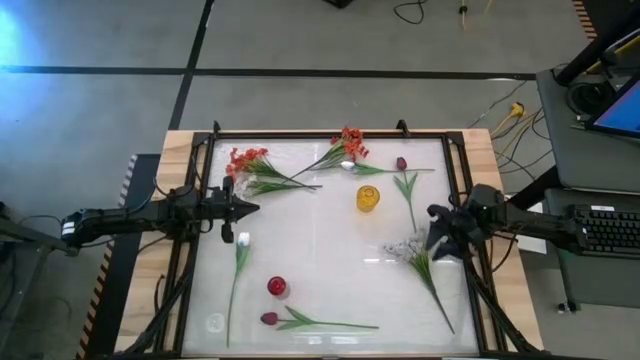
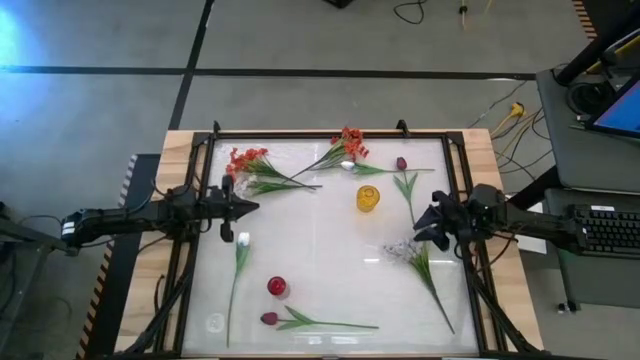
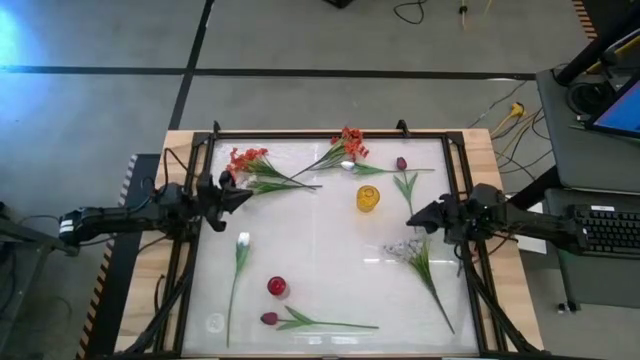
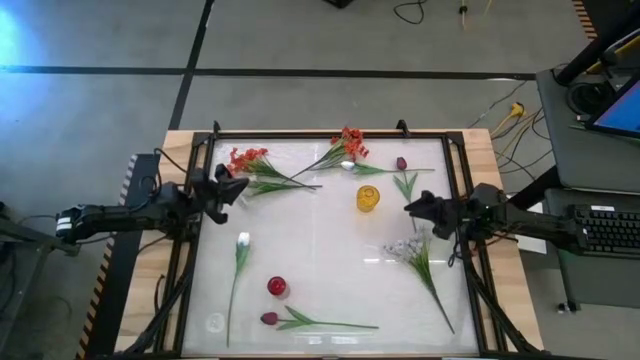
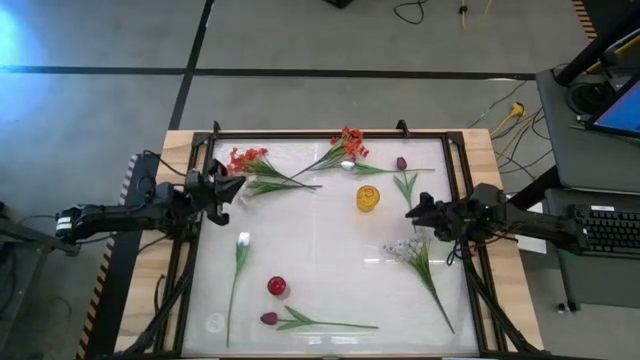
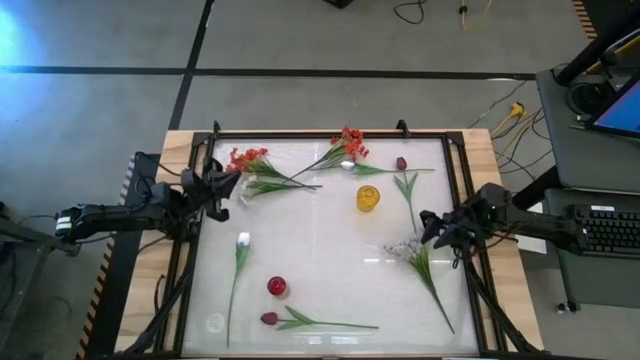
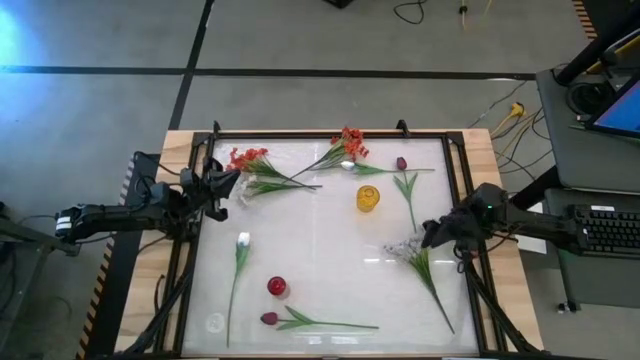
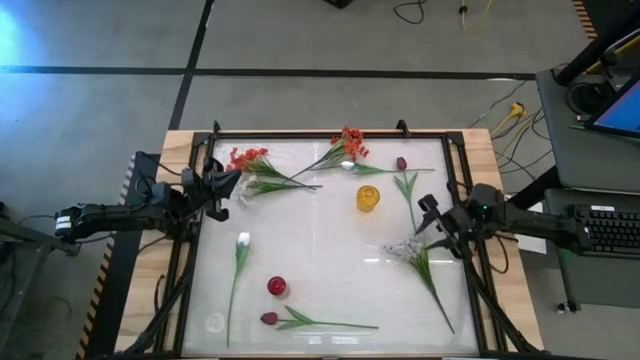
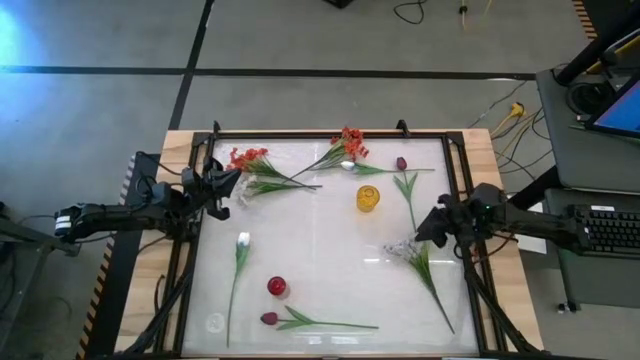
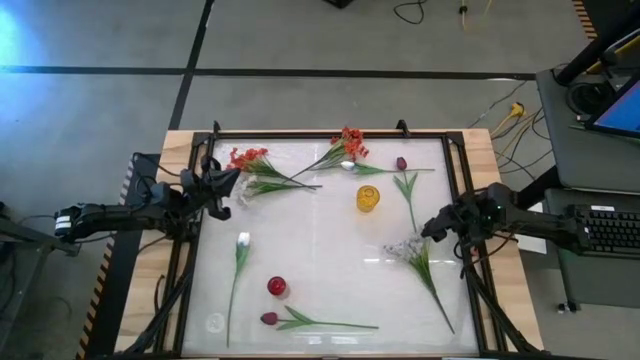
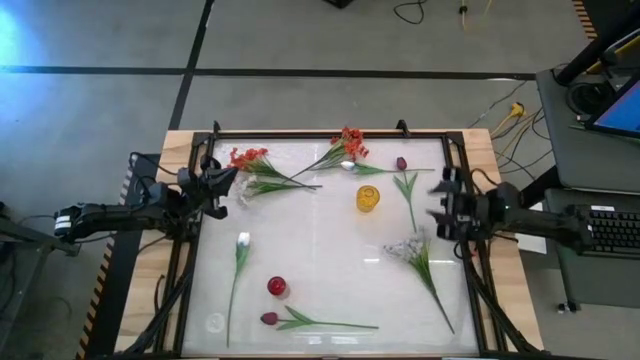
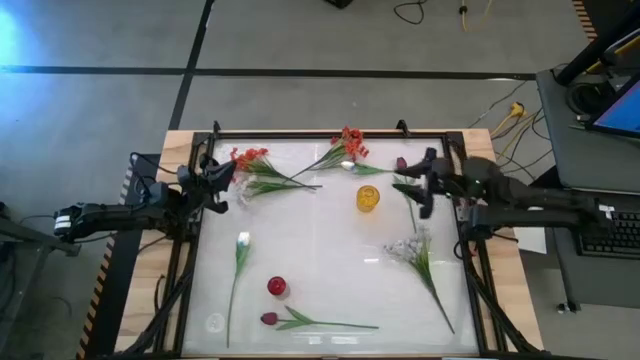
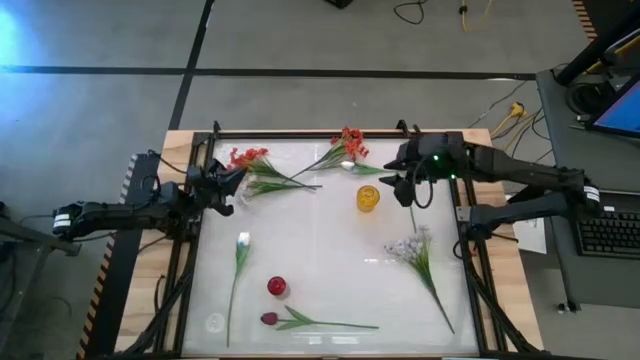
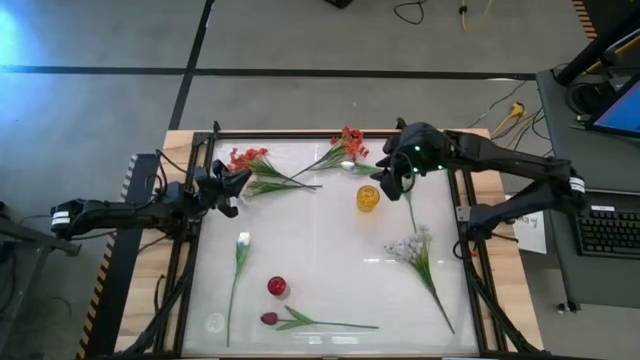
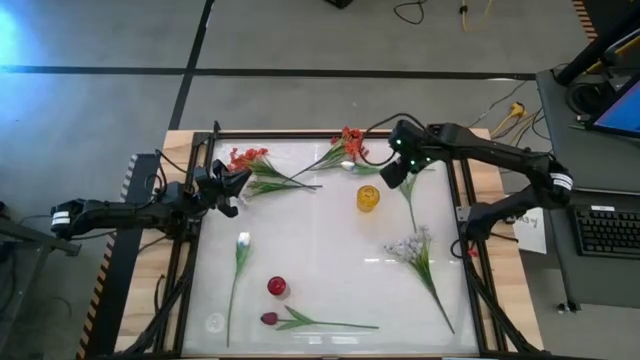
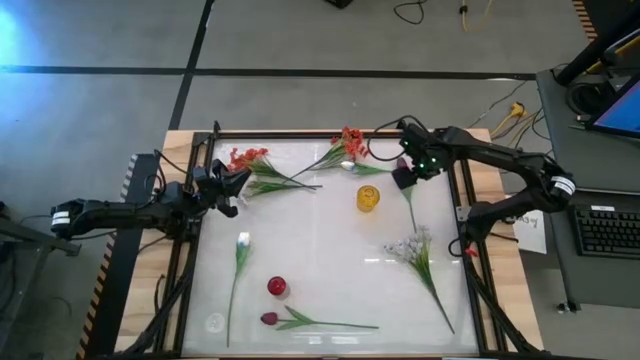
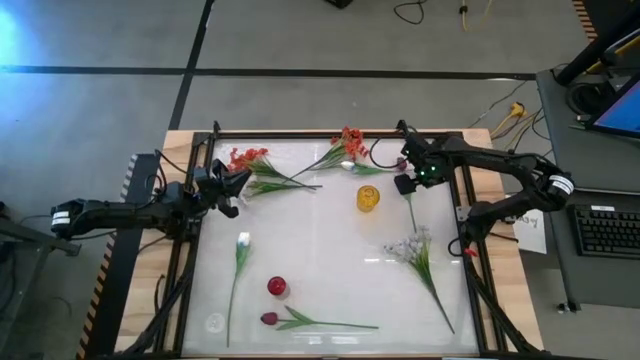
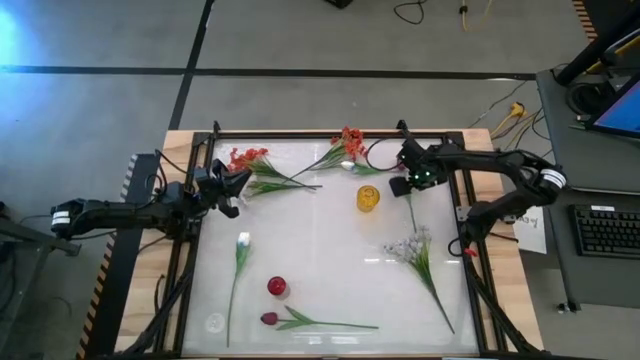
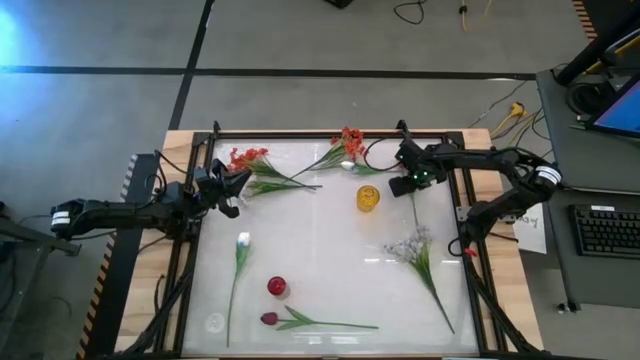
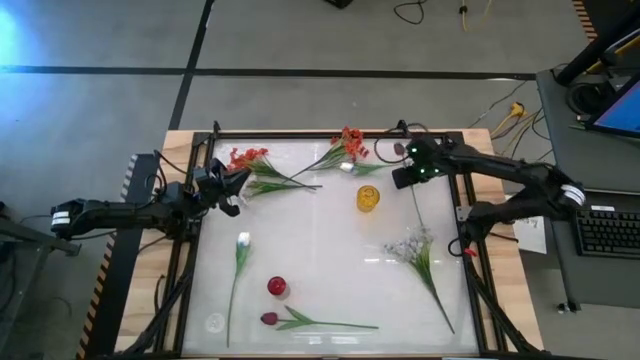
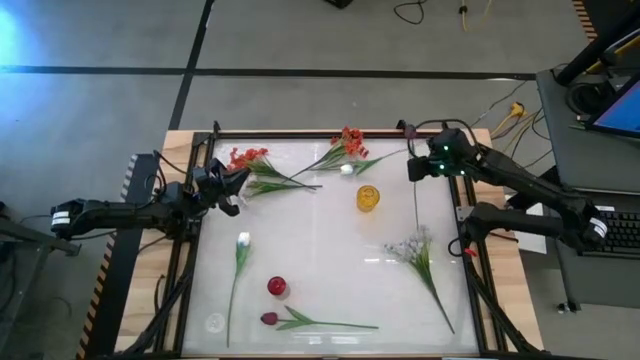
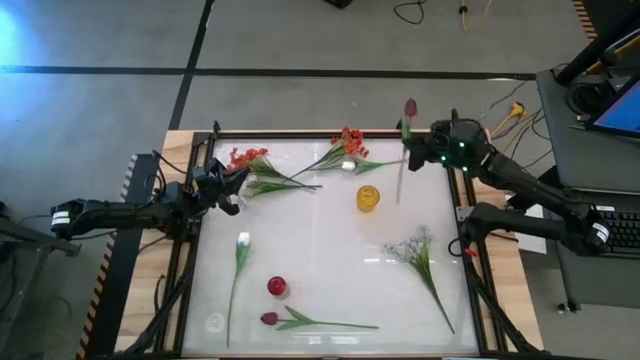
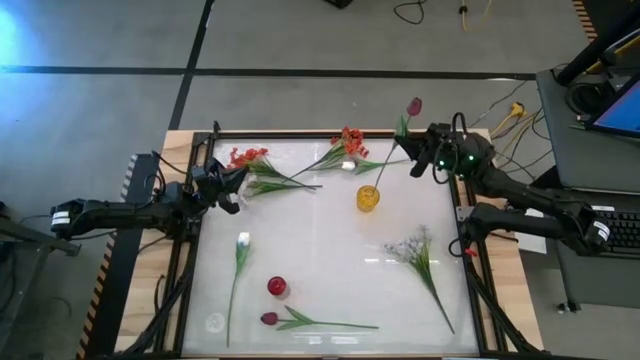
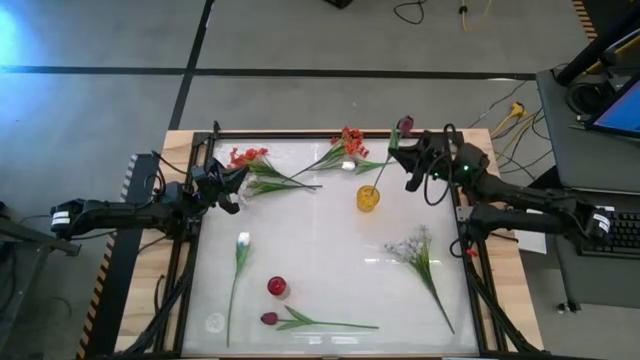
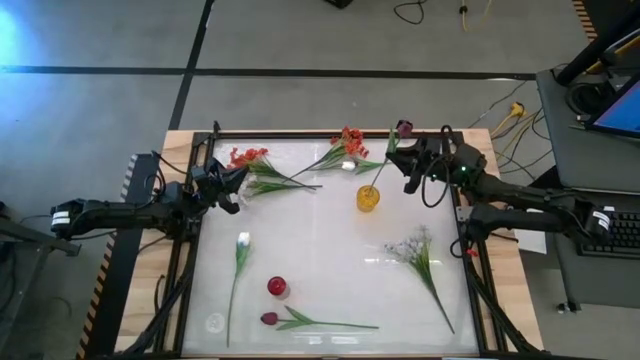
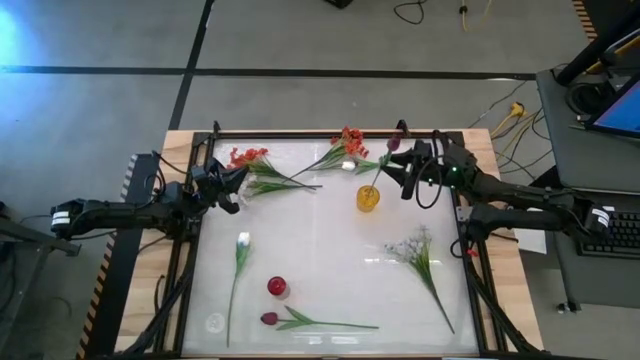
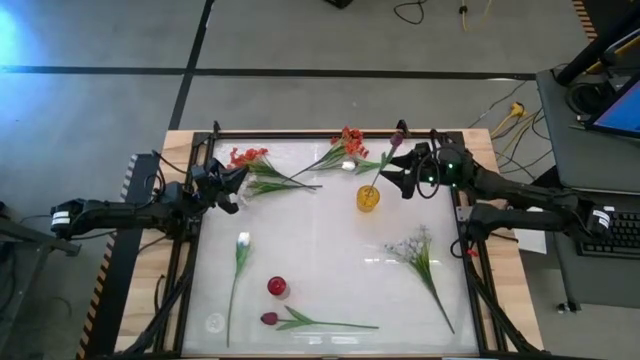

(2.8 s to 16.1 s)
Task: Sort flowers into vase by color
Put the top red flower into the yellow vase

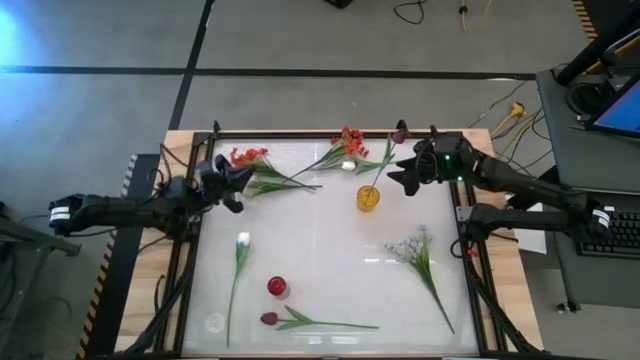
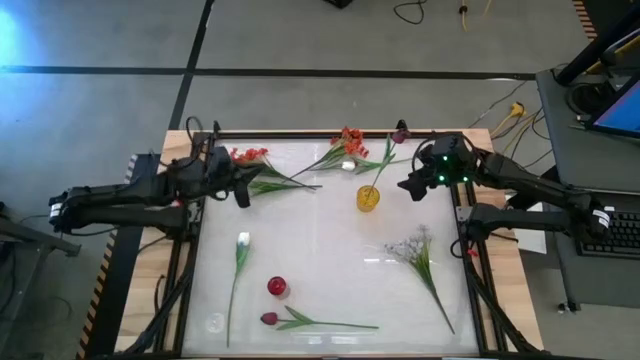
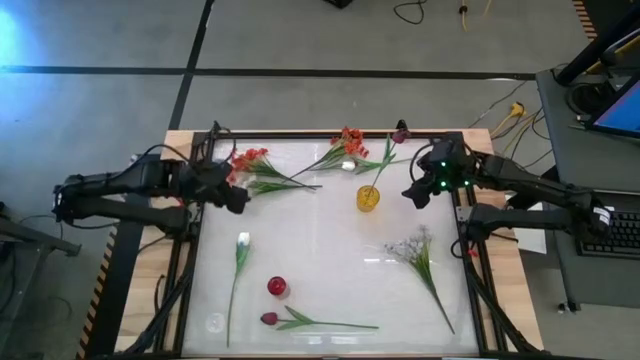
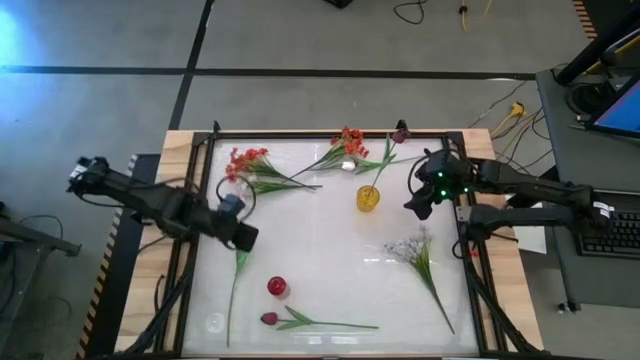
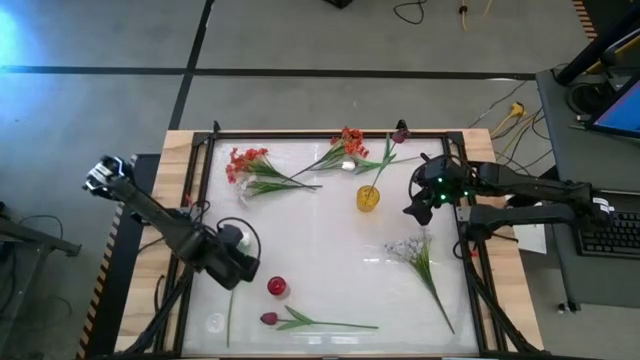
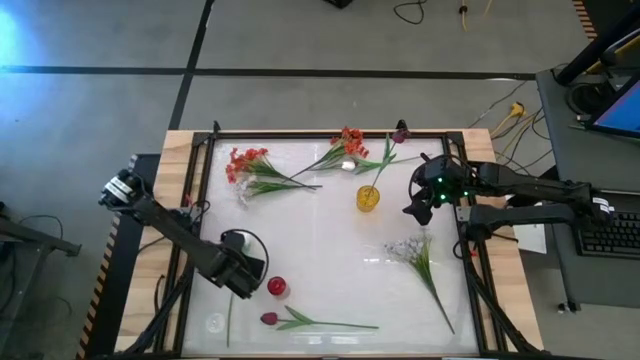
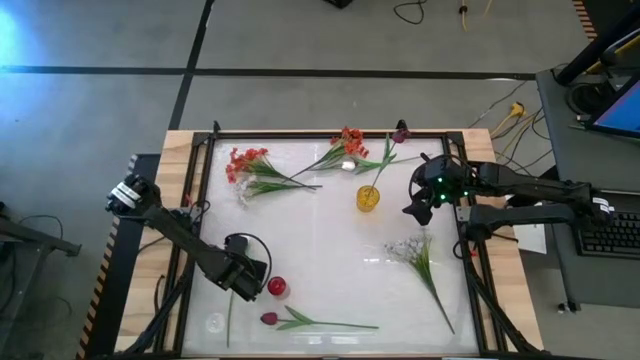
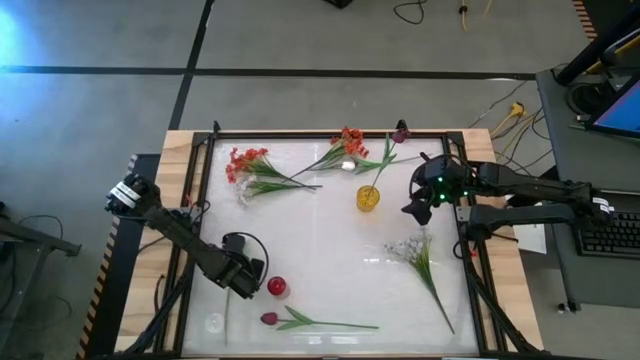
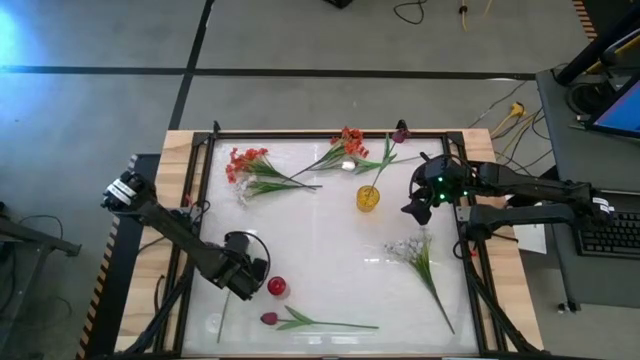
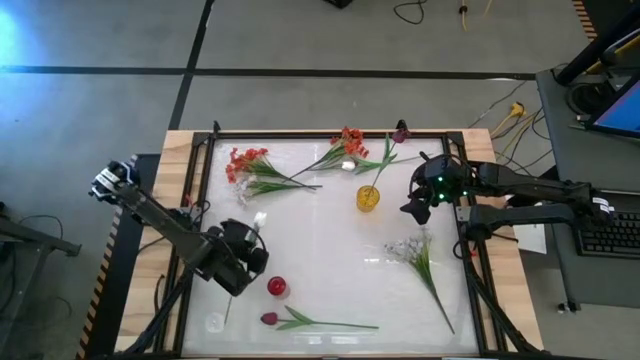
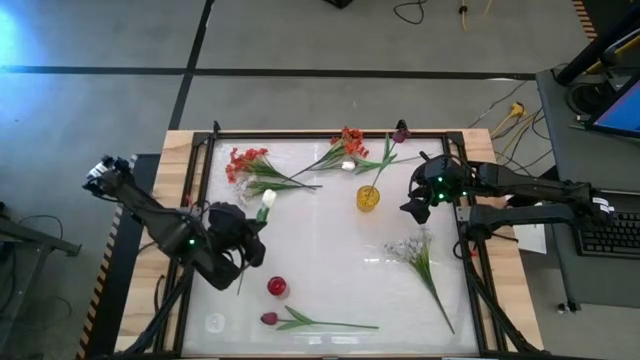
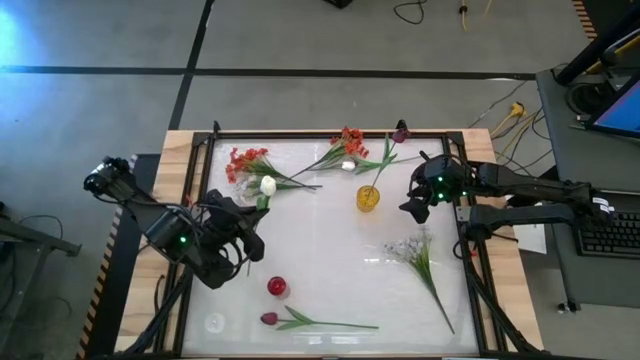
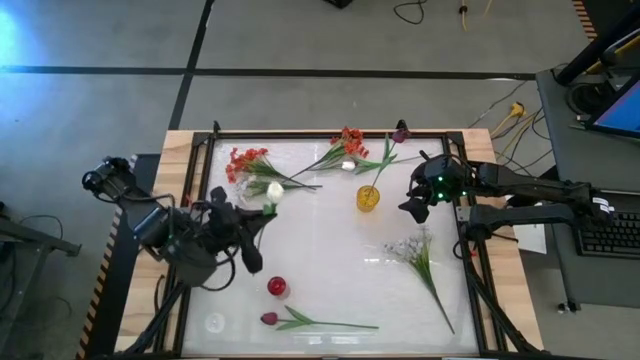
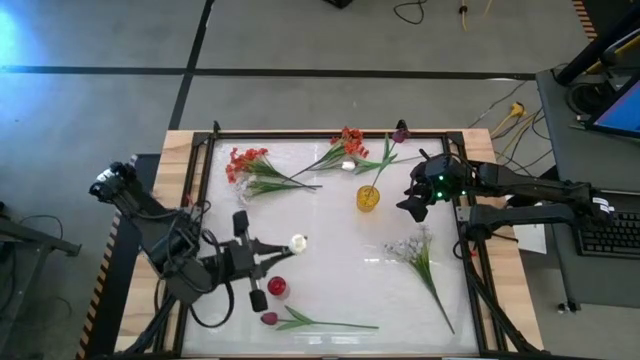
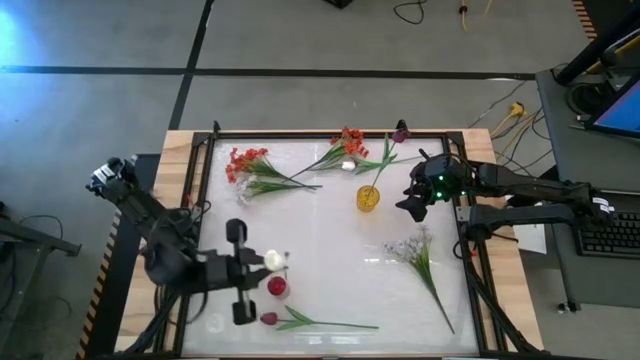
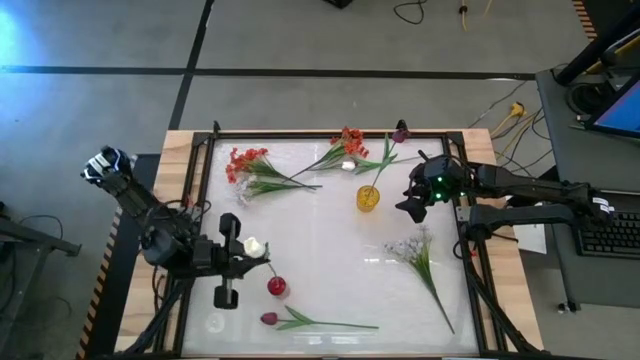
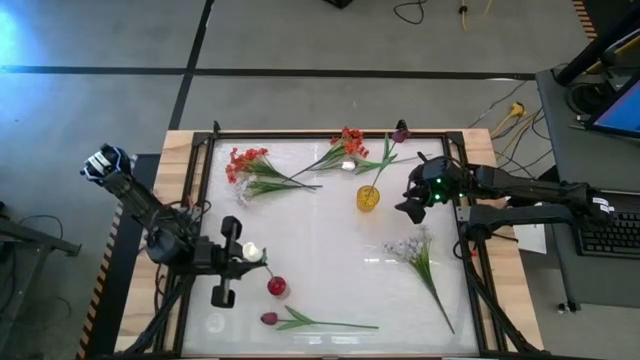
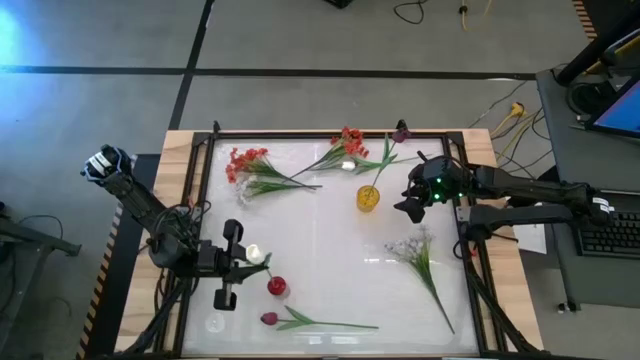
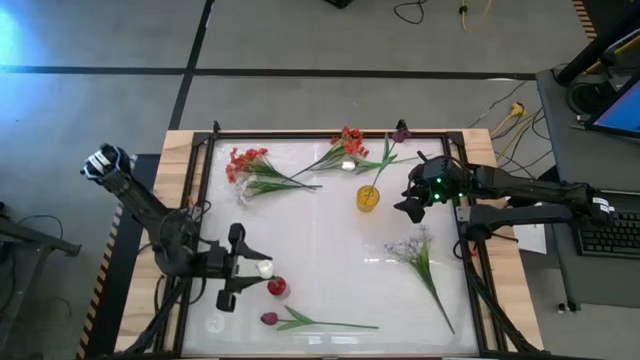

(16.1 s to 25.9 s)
Put the bottom white flower into the red vase
